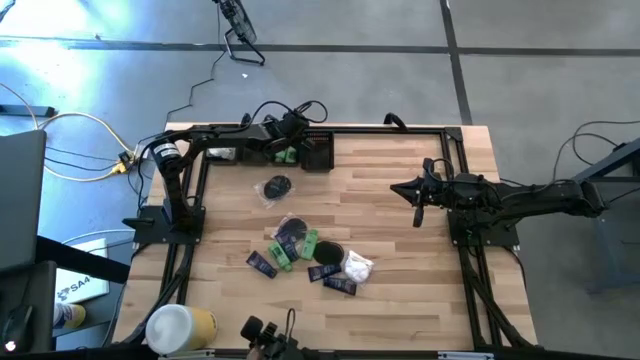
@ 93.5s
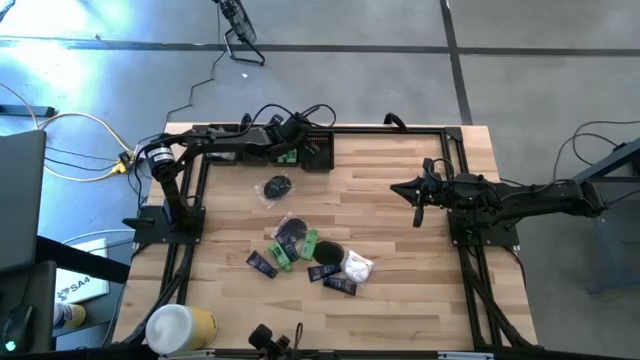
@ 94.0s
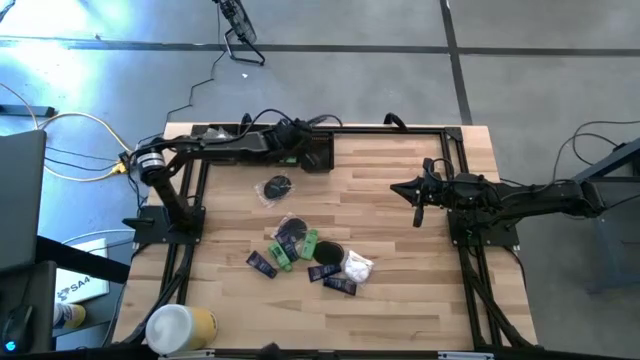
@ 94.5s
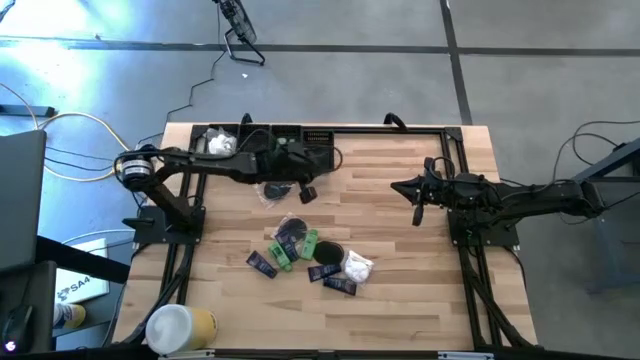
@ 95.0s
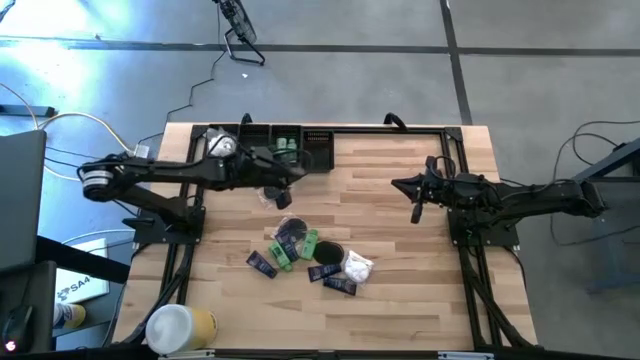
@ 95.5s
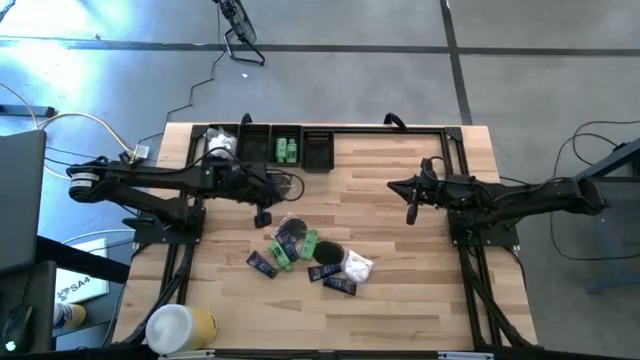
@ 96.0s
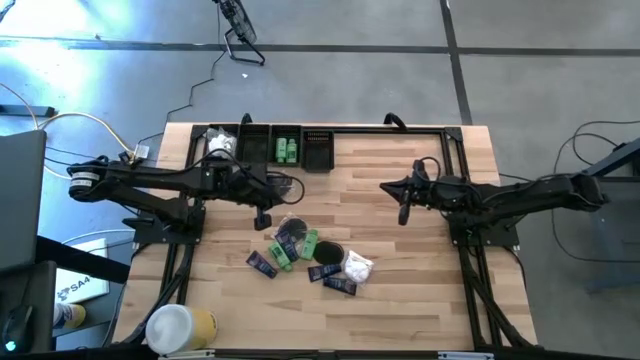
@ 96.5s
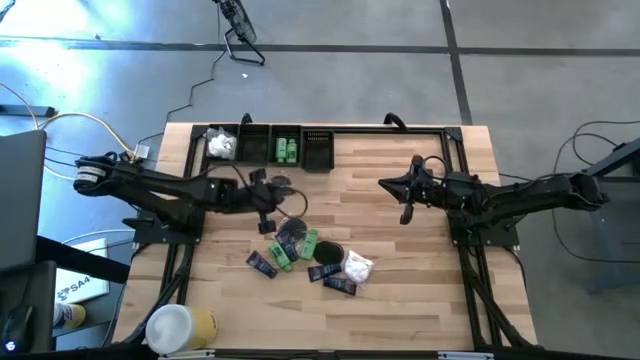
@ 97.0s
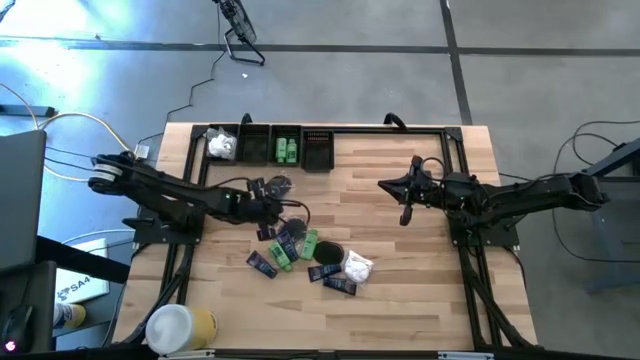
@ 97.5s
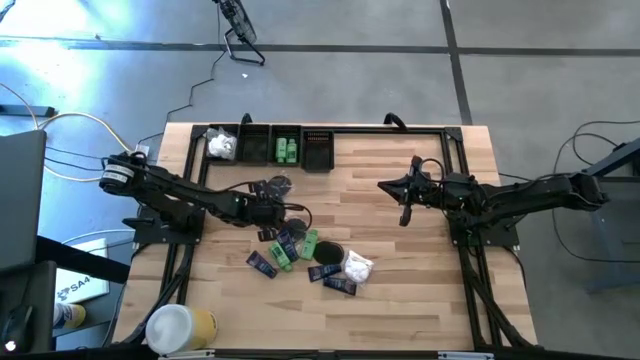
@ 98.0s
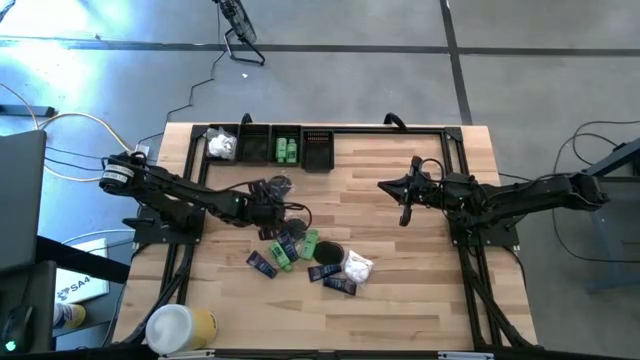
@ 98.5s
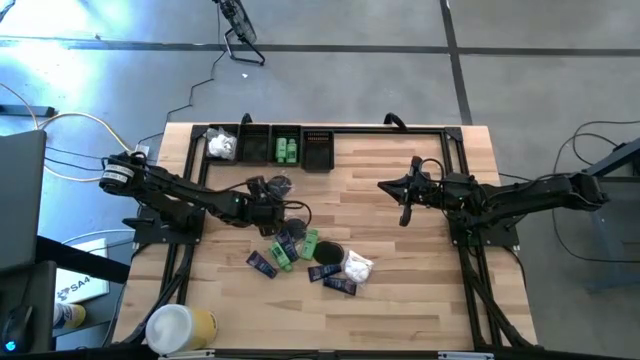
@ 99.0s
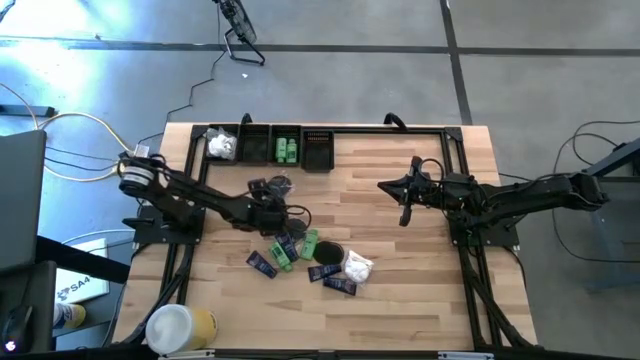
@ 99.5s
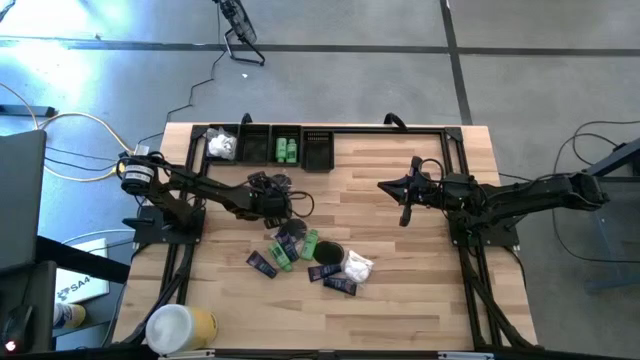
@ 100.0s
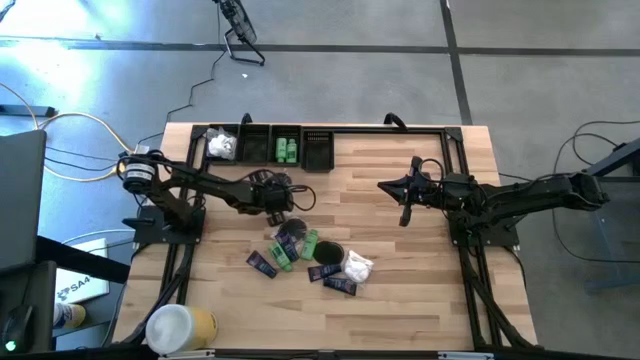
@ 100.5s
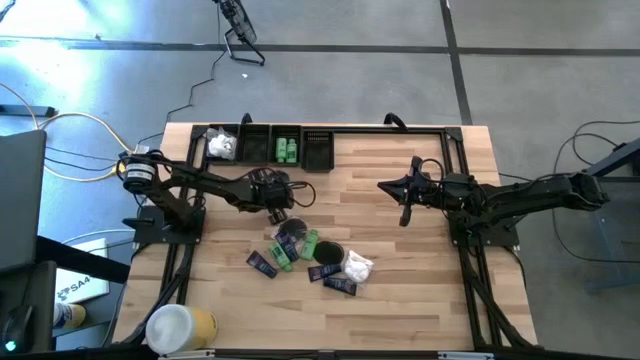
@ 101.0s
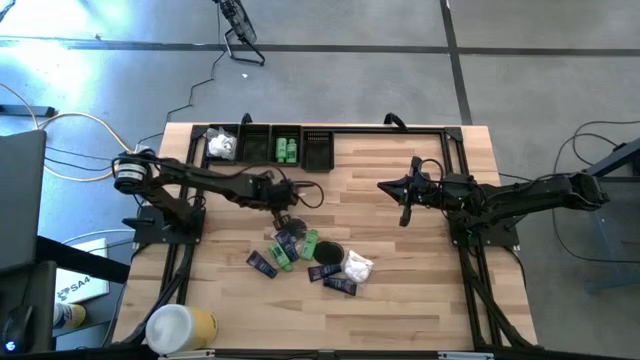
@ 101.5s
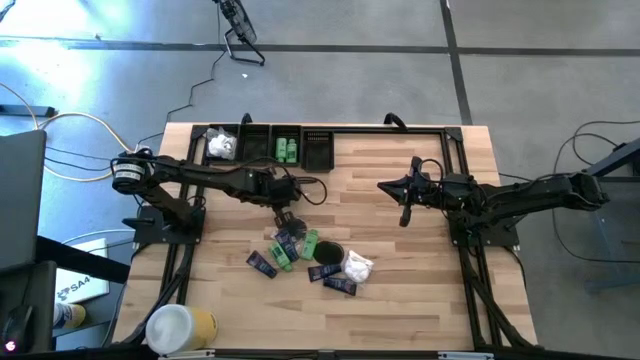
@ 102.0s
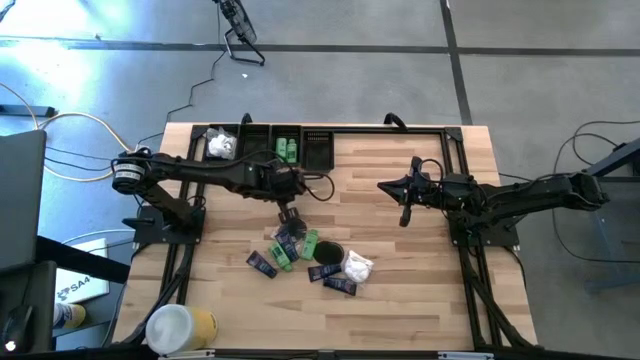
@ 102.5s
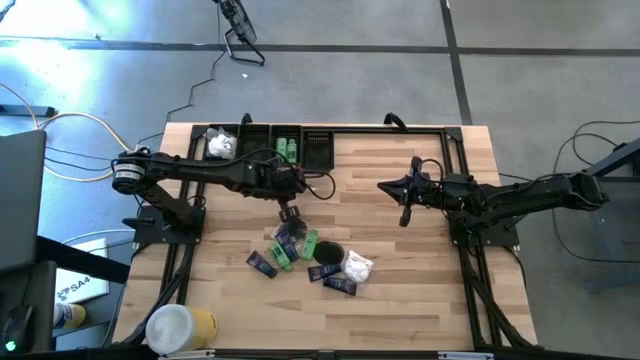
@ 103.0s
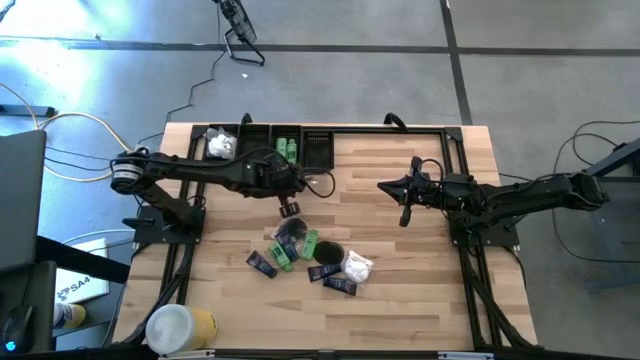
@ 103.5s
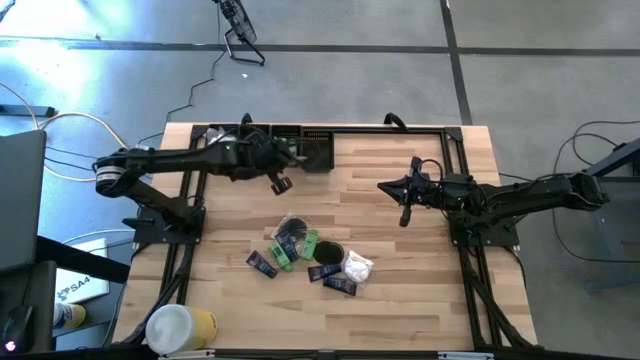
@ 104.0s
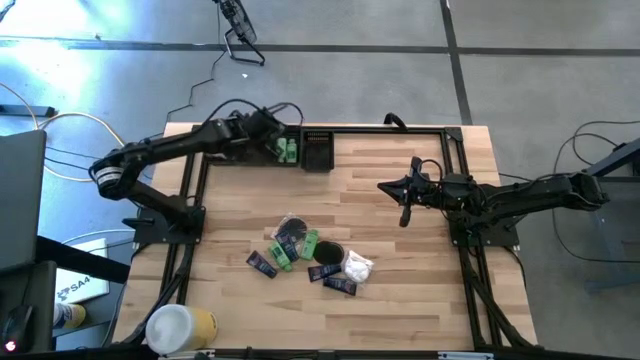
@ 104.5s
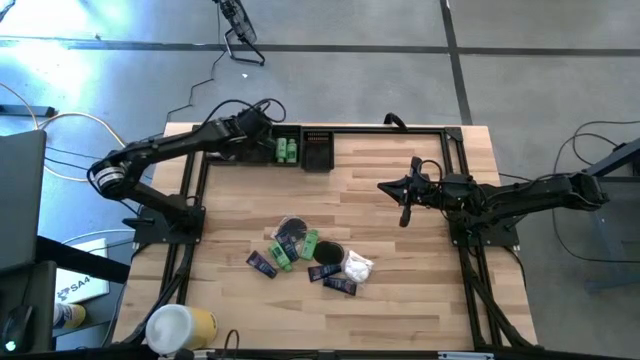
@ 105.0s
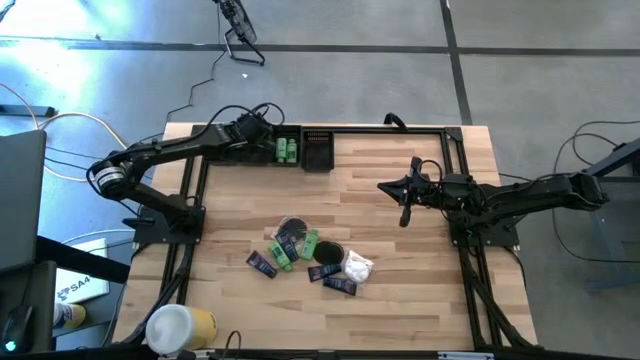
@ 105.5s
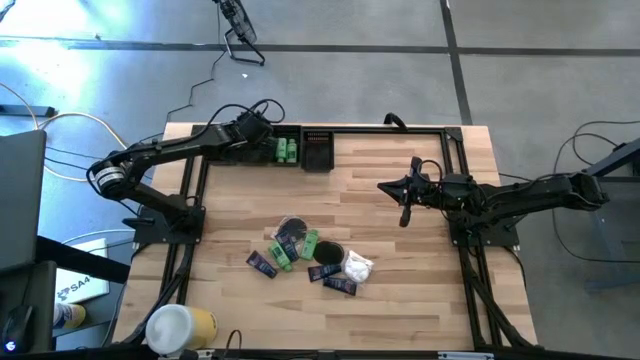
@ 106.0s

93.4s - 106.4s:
Task: Pick & Place Travel size toiletries
Put the hair brush into the middle left black bin

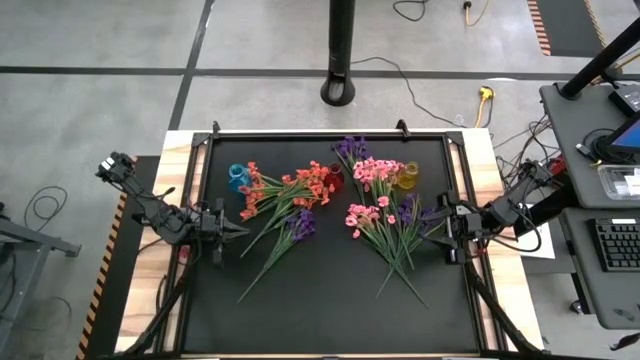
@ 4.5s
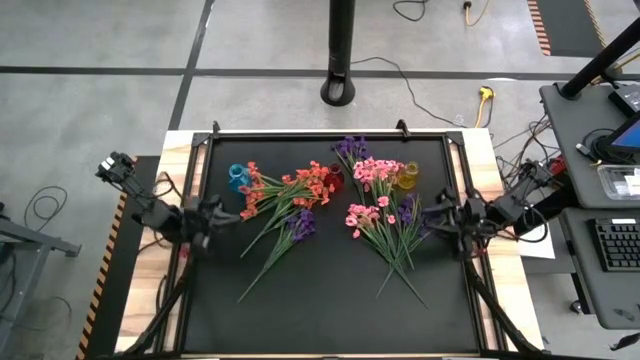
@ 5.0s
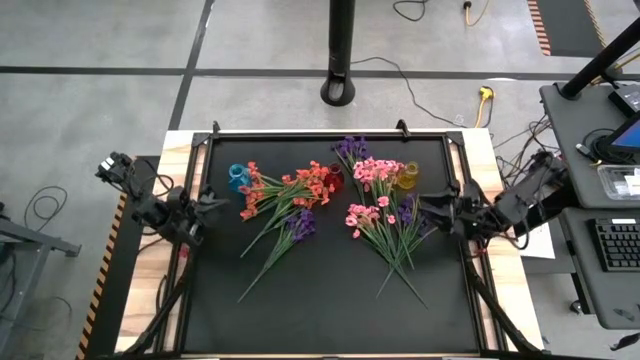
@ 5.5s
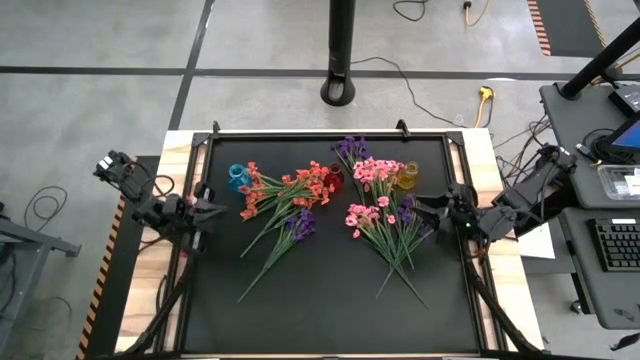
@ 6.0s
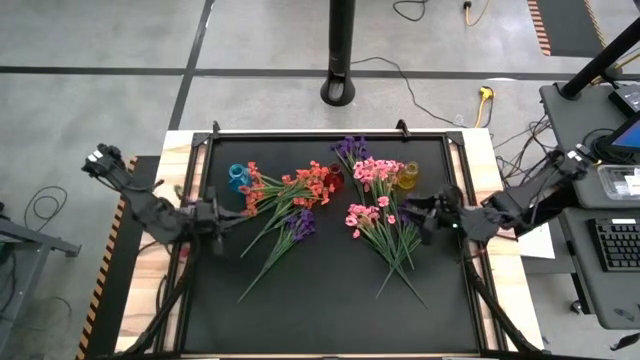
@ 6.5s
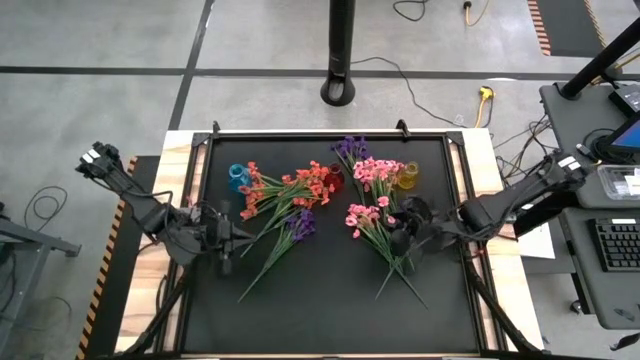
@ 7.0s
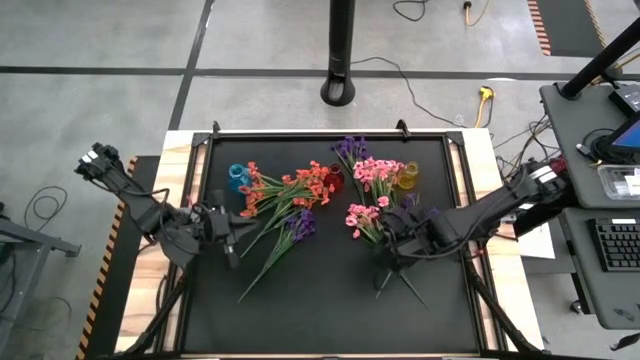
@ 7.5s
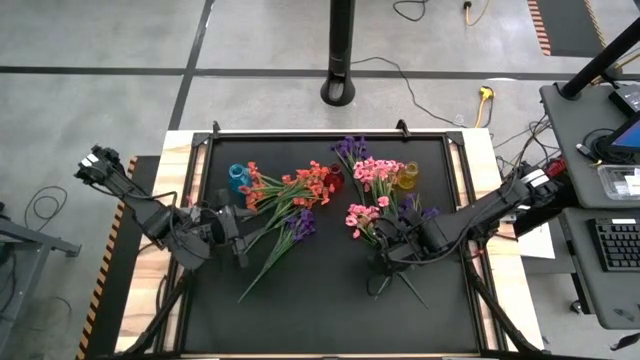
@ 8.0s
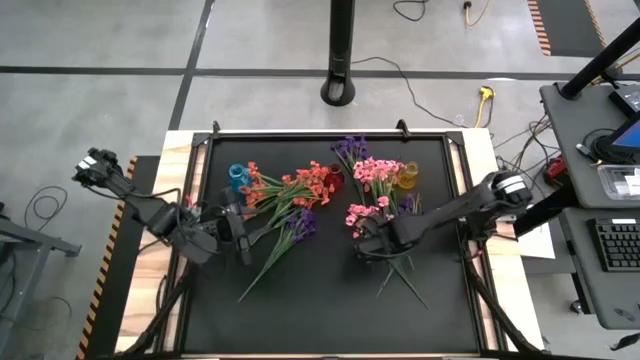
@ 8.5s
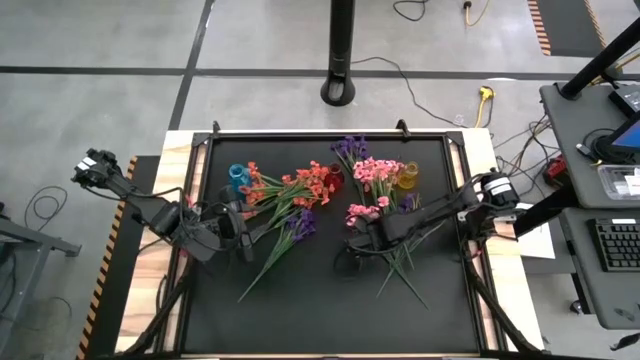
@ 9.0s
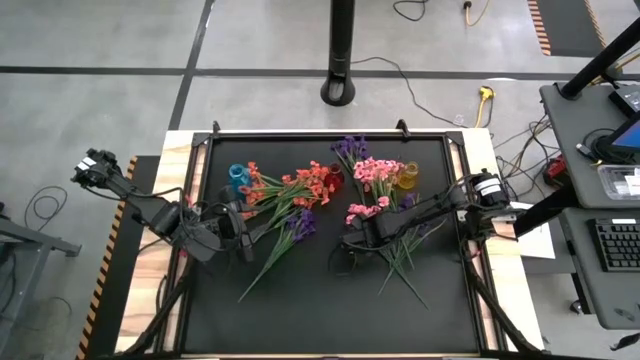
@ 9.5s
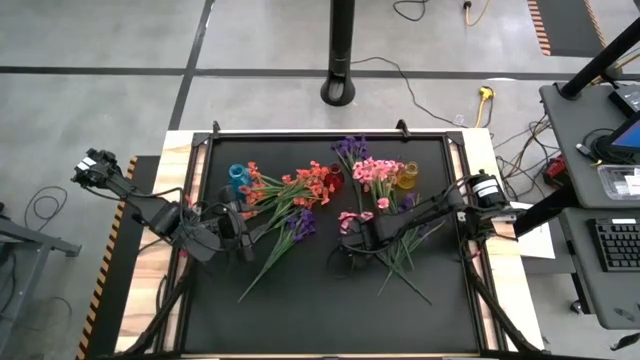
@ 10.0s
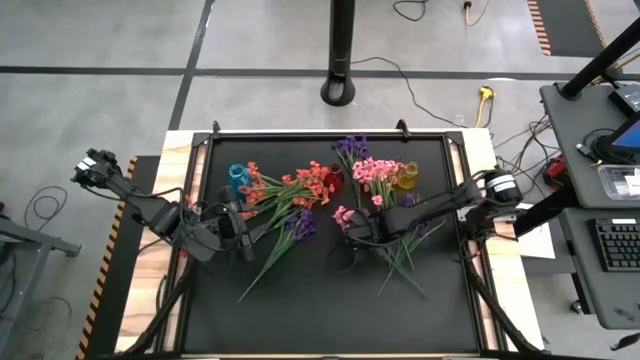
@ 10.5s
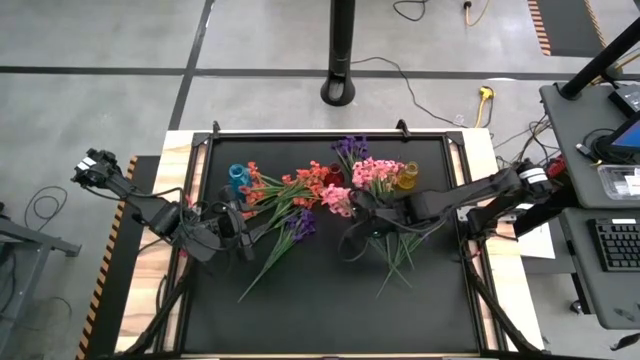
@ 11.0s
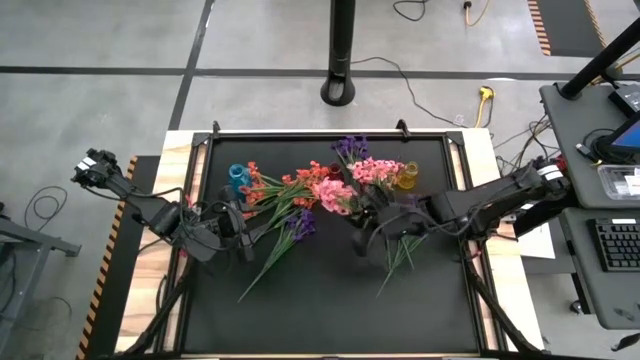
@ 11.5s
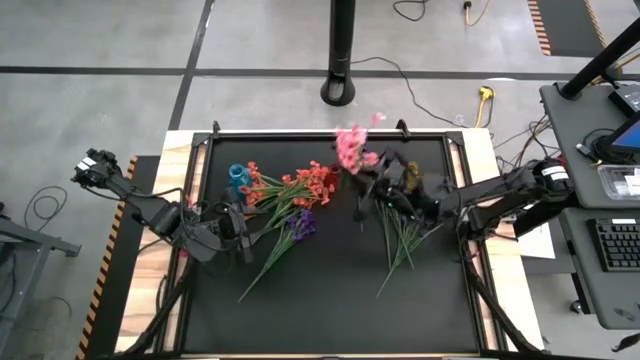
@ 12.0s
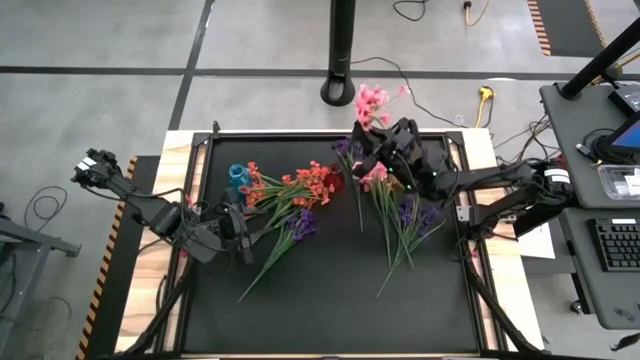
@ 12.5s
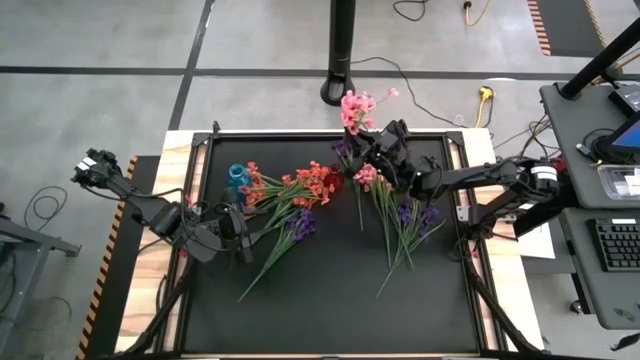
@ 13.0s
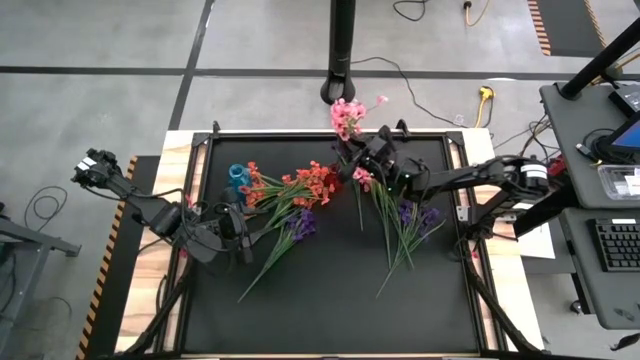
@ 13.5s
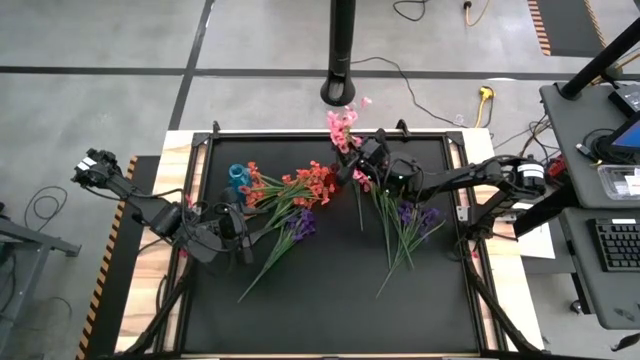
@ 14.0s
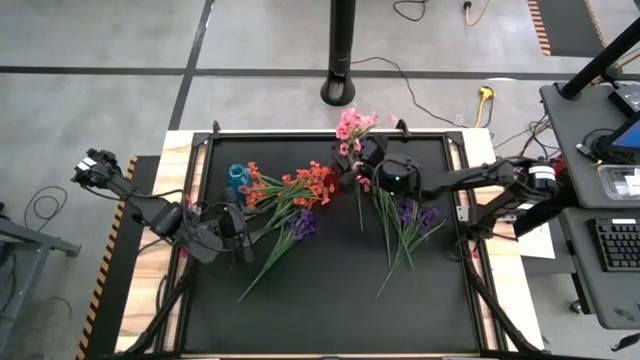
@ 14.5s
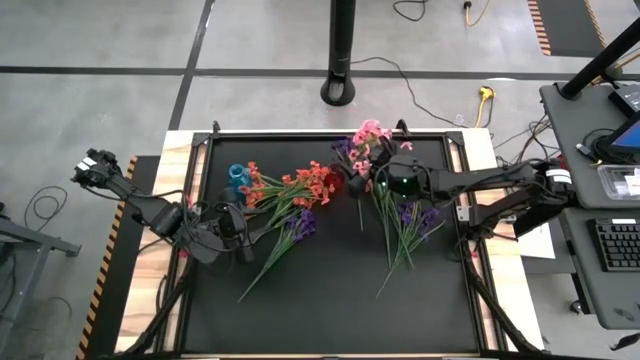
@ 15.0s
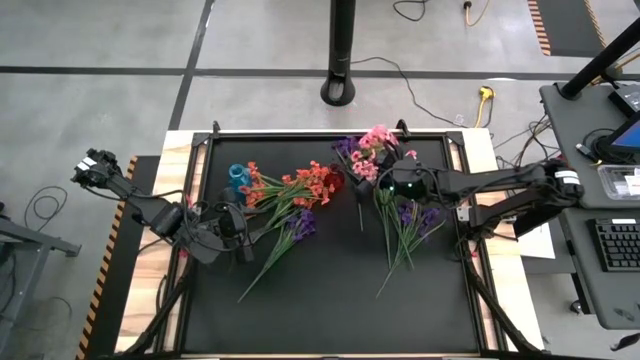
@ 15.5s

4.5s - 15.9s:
Task: Sort flowers into vase by color
Put the bottom right pink flower into the red vase
